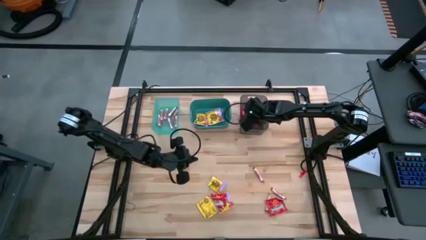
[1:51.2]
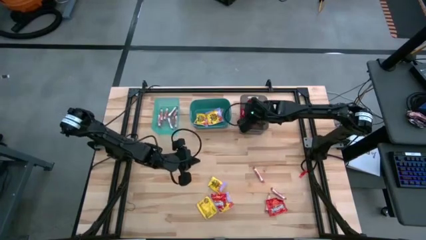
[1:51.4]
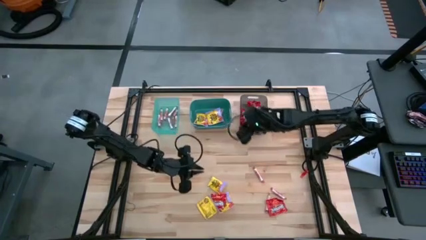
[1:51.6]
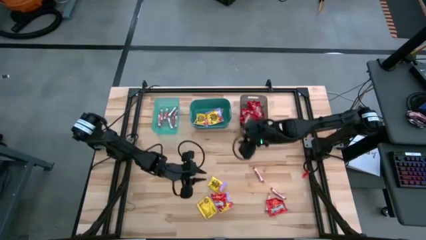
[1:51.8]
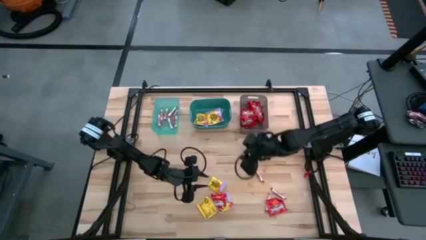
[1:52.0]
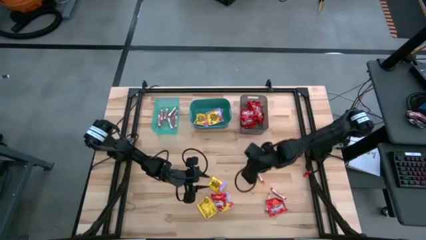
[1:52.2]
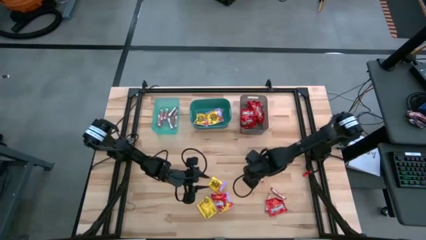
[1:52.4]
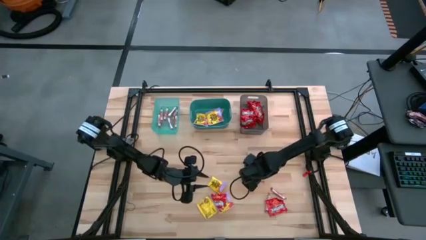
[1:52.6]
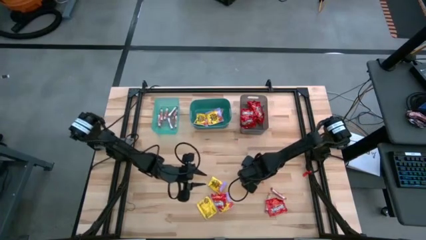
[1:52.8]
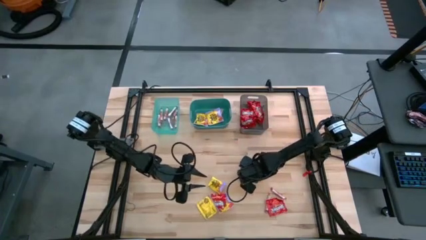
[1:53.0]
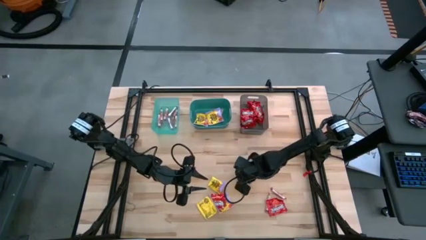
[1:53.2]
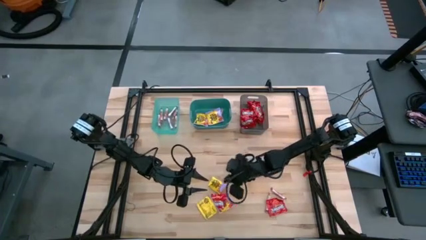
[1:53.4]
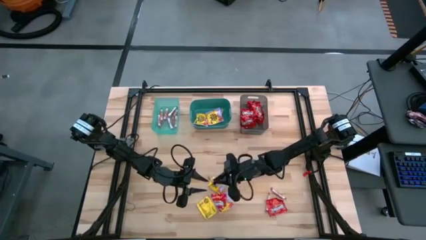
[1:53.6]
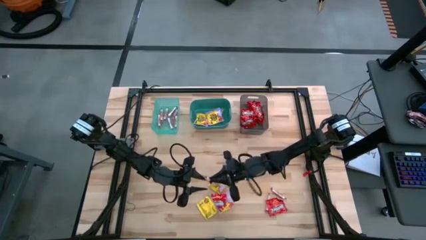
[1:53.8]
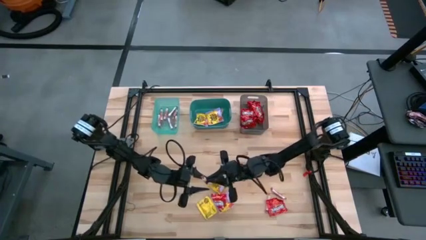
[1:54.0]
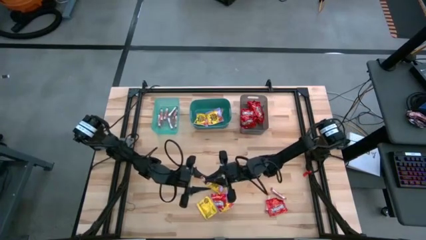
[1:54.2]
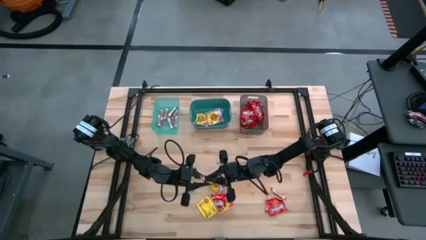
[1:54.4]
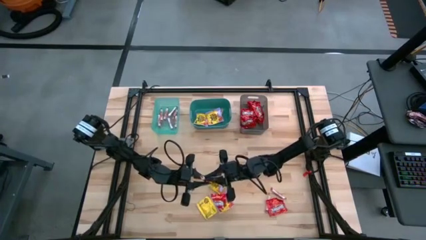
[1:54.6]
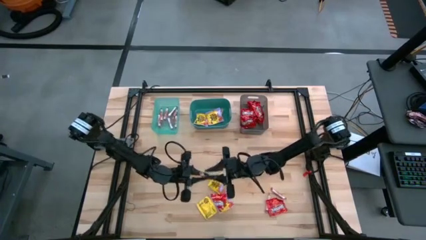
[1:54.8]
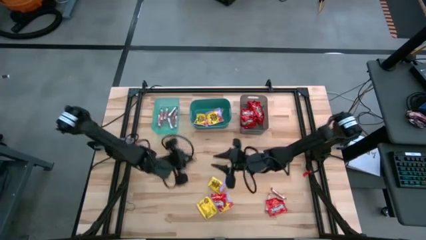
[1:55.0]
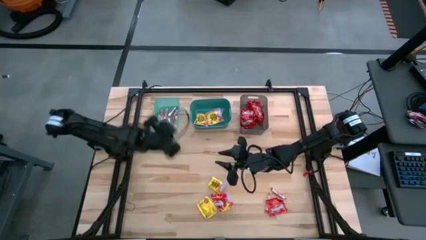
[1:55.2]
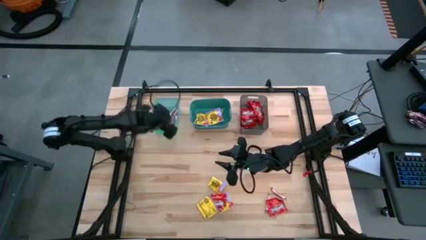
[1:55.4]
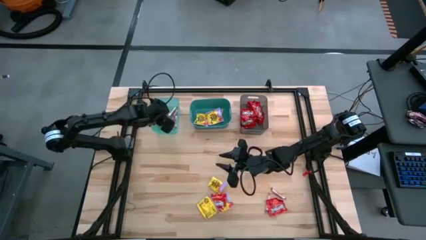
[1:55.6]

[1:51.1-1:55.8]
Task: Sort candy
Put the white candy into the blue bin

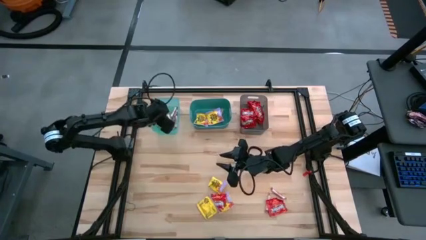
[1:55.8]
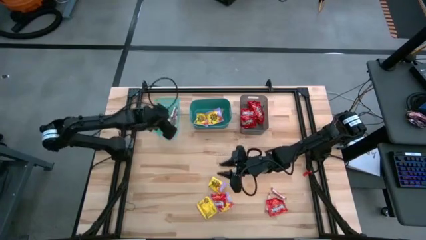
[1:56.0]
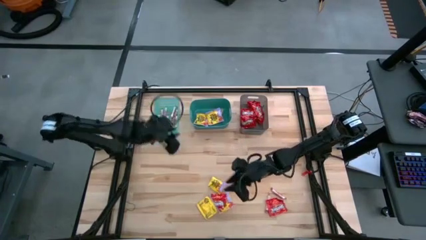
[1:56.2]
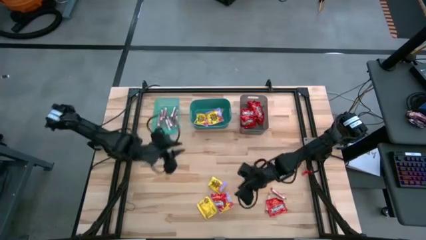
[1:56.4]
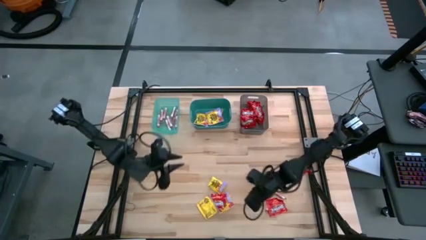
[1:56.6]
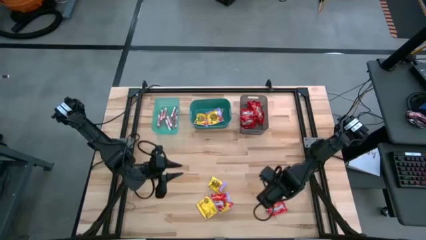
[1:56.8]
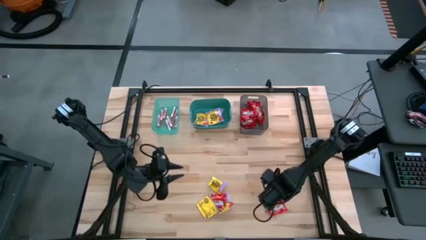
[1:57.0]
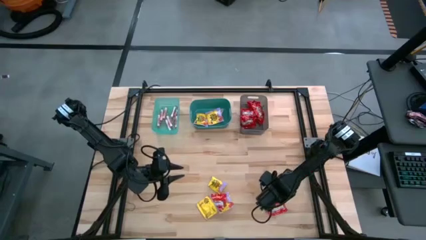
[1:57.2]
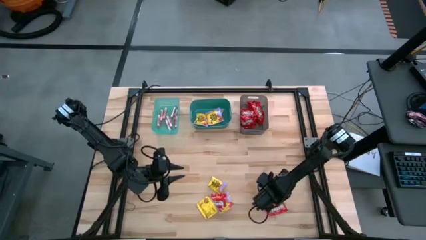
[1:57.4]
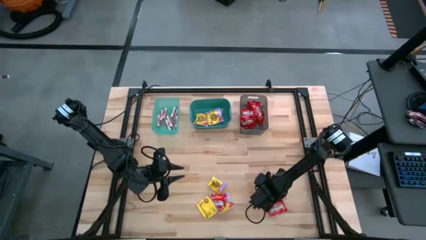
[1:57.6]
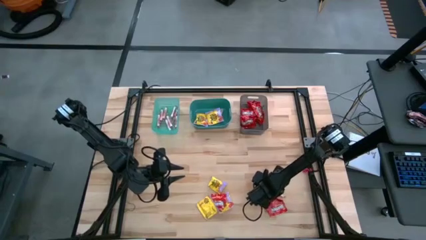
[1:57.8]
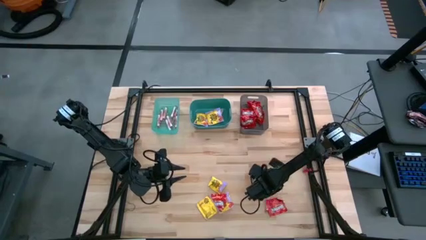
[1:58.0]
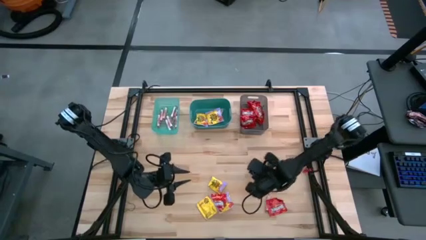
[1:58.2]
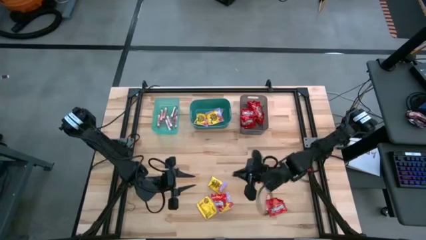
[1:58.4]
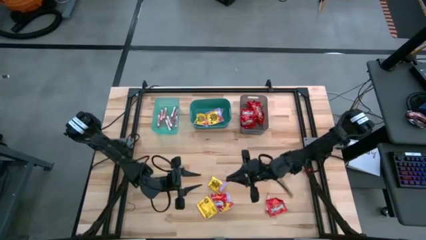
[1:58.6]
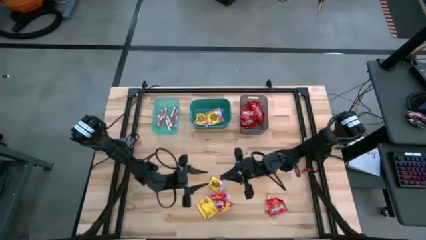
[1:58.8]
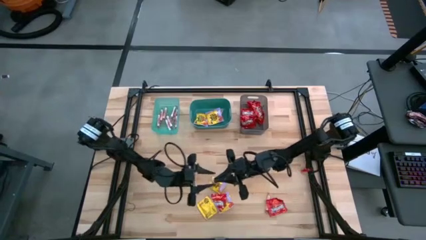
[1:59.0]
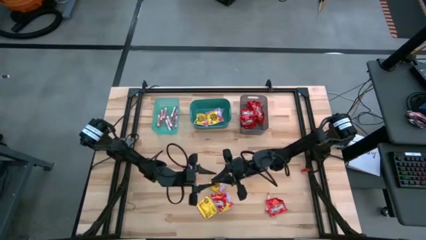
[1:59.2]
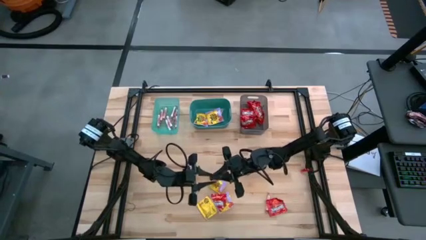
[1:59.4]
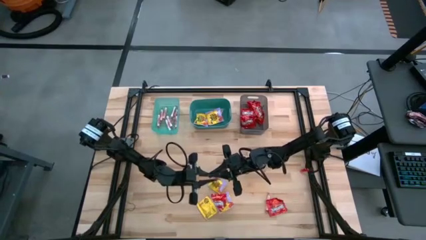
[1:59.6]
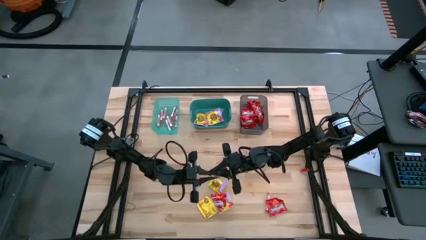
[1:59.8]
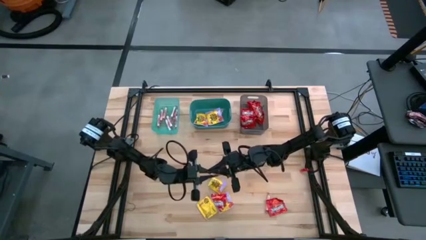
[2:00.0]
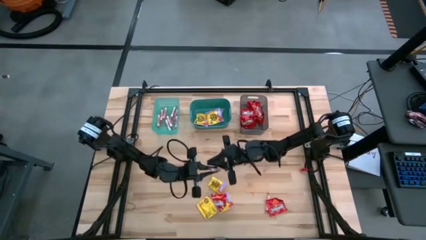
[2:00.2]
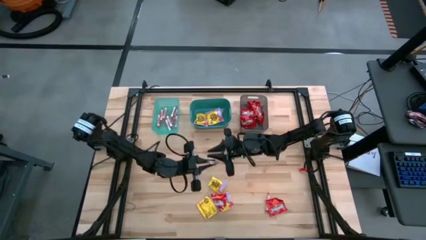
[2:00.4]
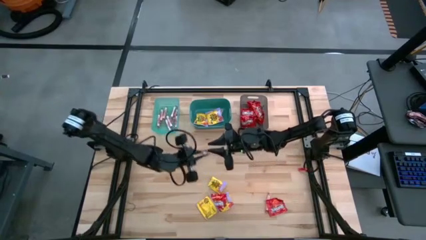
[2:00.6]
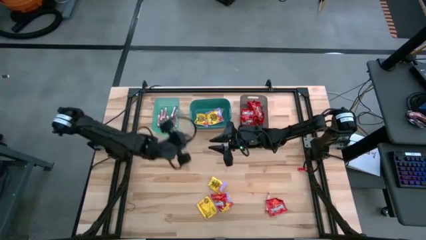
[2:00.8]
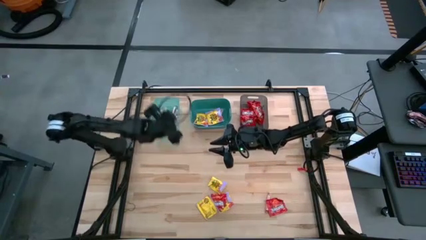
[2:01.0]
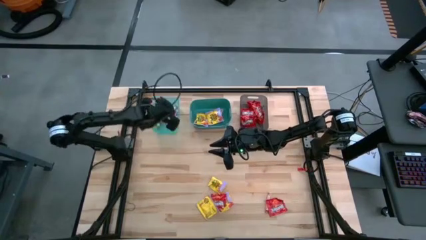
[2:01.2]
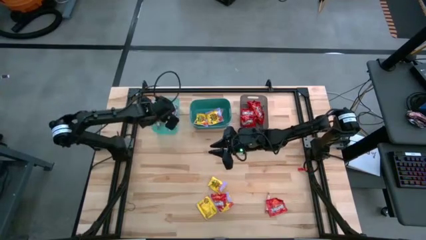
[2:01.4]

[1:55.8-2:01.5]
Put the white candy into the blue bin

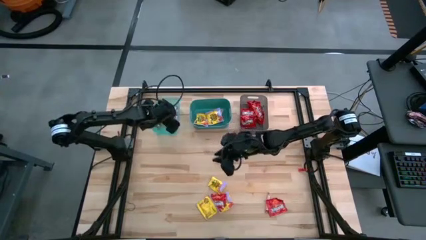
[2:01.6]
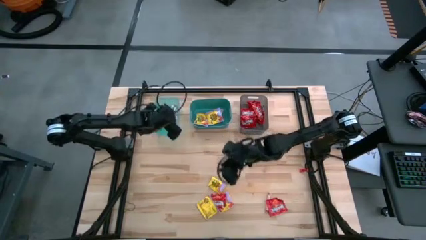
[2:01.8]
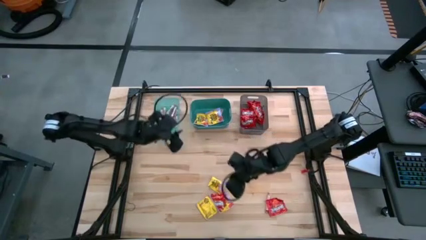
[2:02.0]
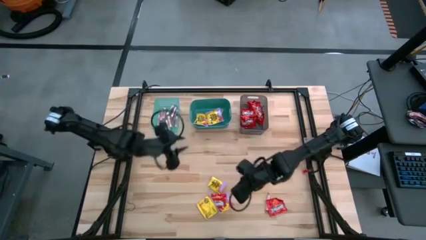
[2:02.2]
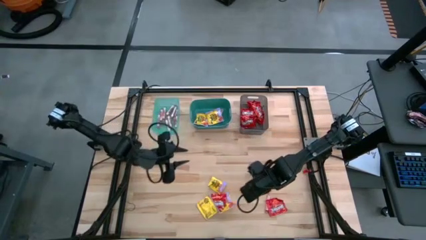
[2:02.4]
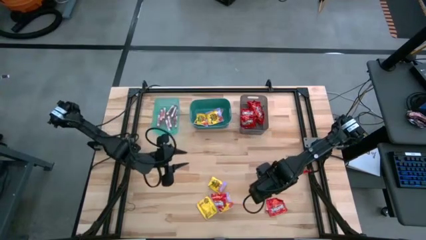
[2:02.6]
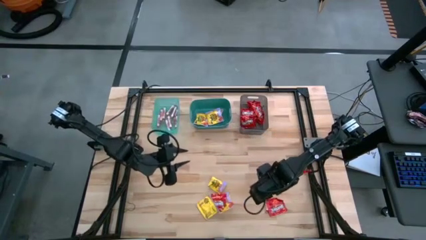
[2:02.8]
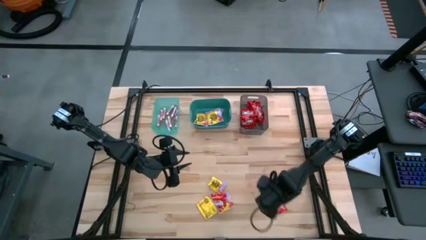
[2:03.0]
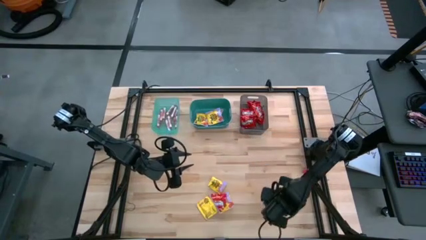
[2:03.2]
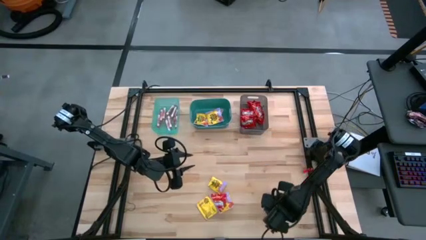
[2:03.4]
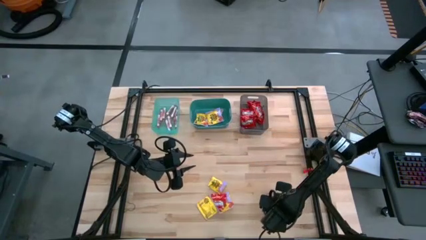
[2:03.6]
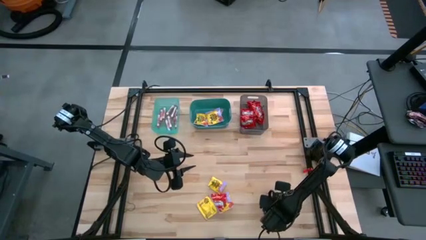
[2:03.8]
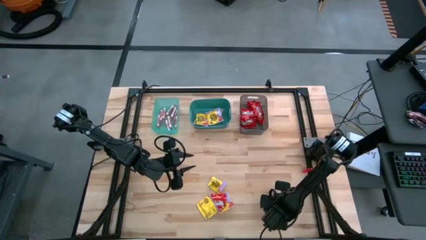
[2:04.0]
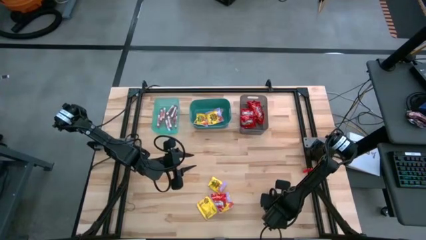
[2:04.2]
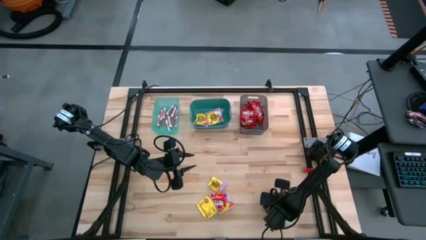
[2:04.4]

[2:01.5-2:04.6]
Put the red candy into the black bin

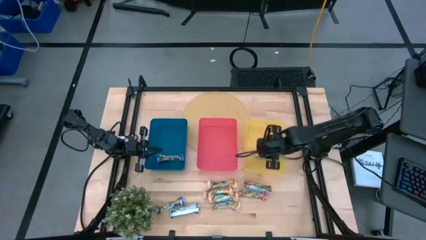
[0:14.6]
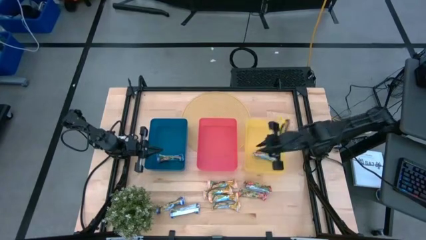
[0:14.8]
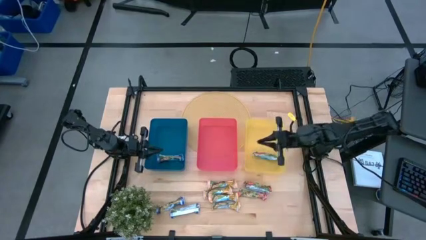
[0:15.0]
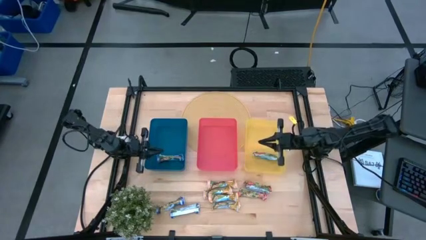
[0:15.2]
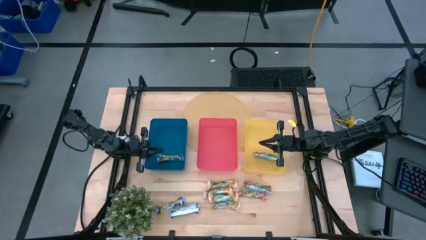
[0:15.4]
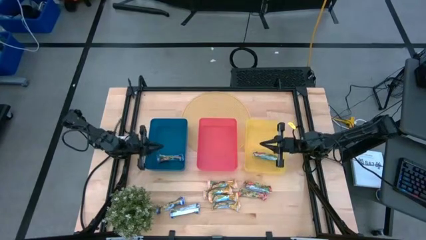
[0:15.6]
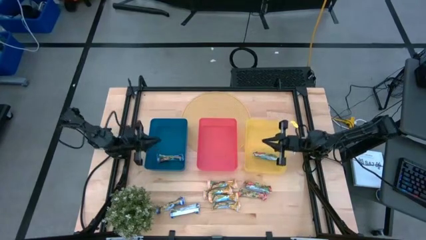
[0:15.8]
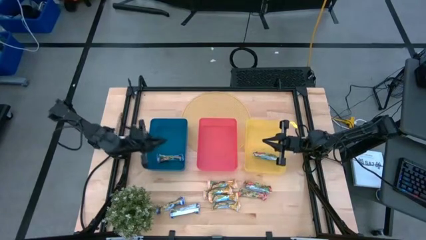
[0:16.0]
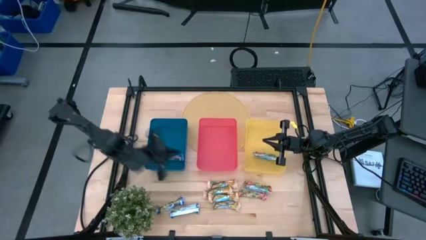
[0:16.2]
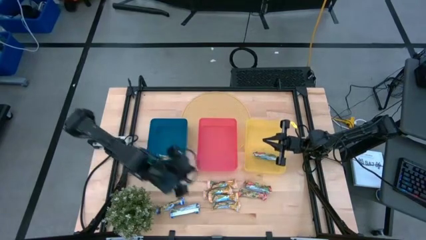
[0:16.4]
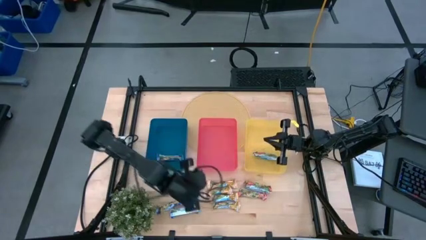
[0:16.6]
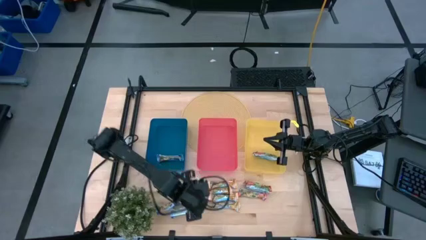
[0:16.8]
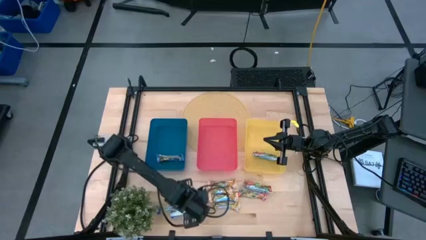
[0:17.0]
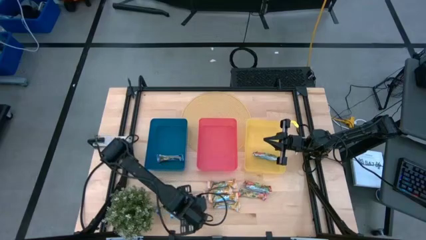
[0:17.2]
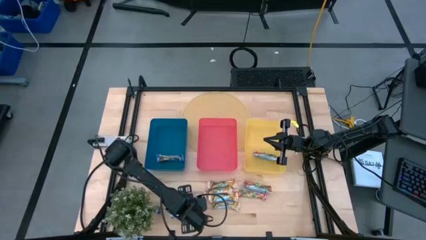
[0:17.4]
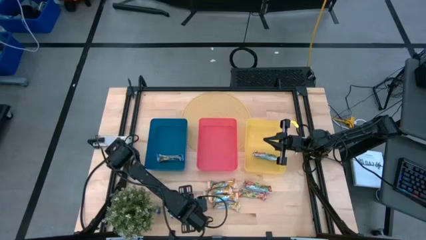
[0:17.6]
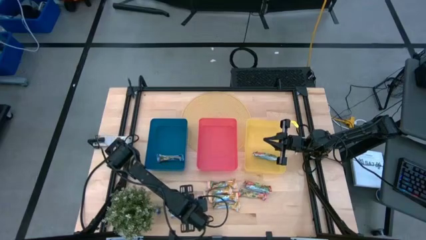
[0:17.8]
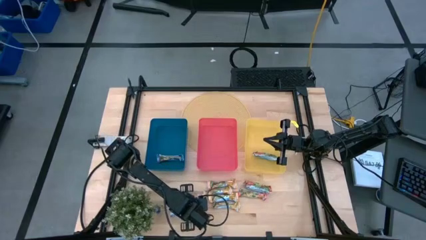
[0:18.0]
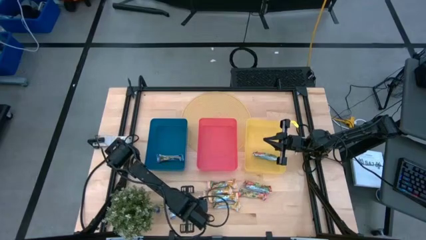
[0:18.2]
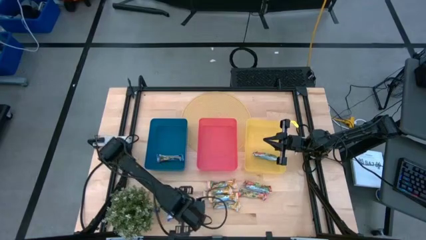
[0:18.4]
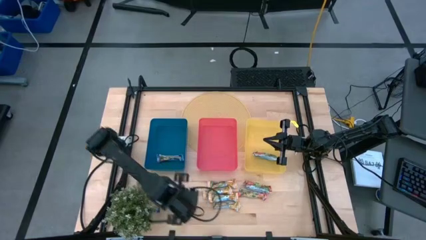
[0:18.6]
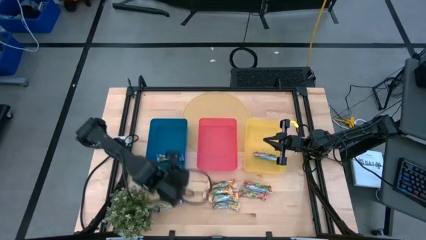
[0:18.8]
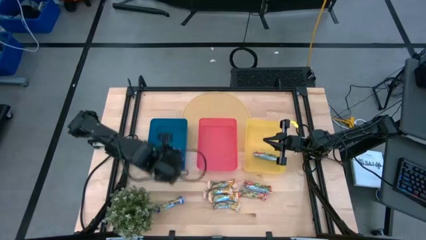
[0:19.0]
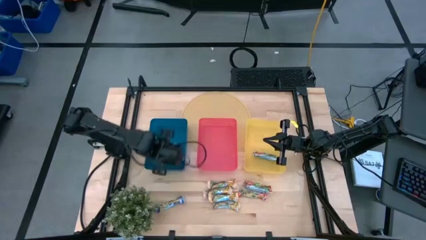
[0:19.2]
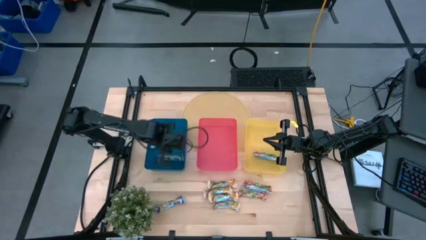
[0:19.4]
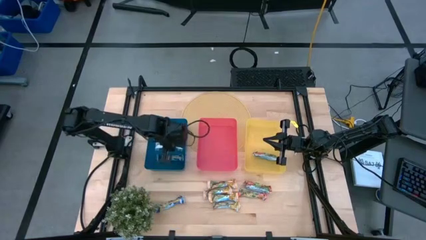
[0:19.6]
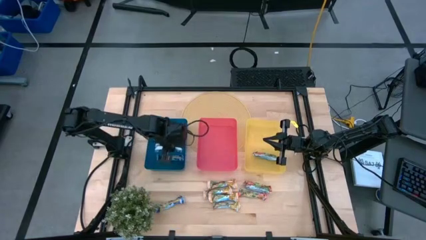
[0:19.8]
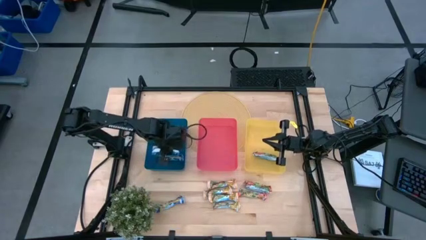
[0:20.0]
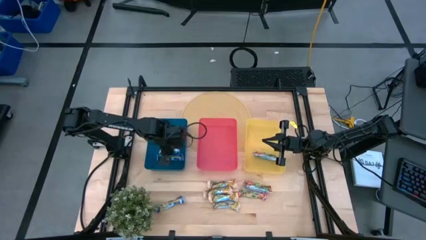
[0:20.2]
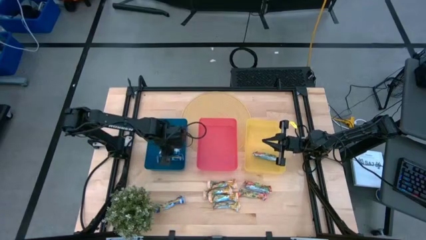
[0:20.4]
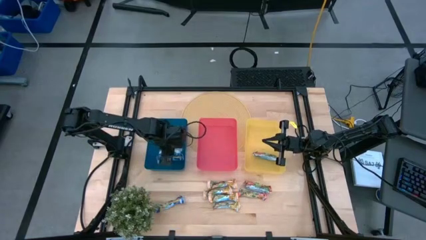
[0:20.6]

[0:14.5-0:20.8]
Task: Pick and place Granola Bars by type
Put the bottom blue granola bar into the blue bin
